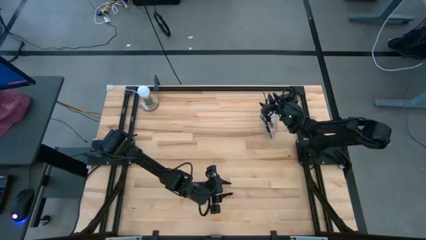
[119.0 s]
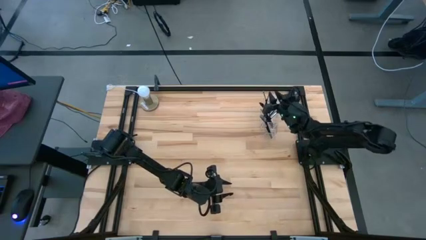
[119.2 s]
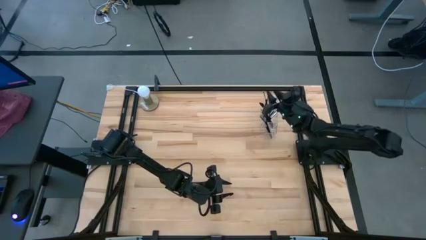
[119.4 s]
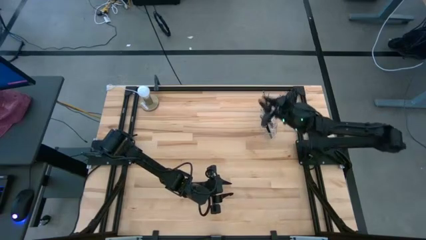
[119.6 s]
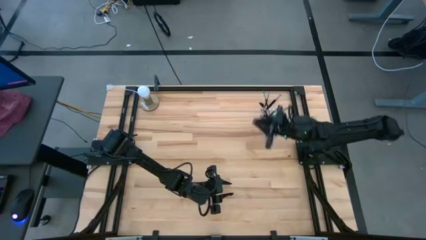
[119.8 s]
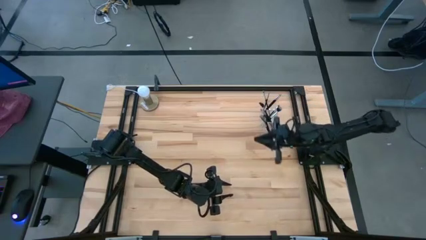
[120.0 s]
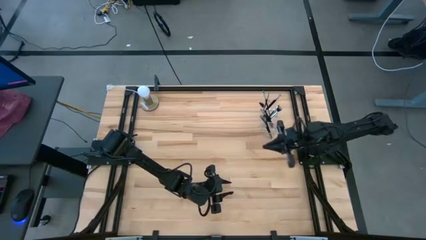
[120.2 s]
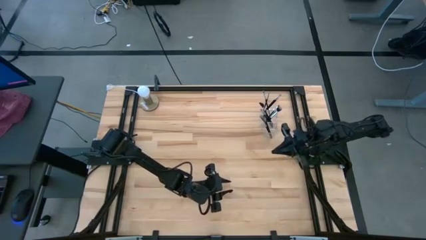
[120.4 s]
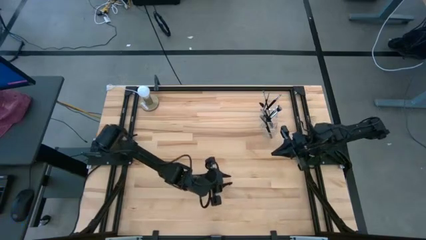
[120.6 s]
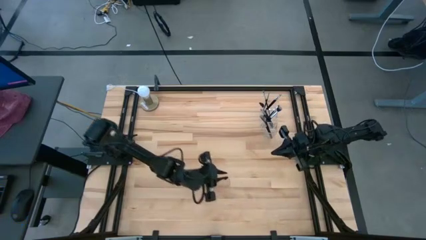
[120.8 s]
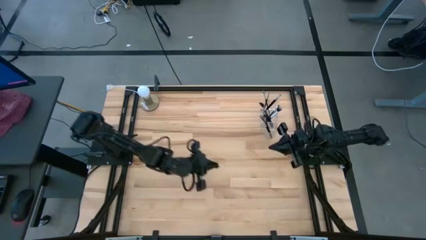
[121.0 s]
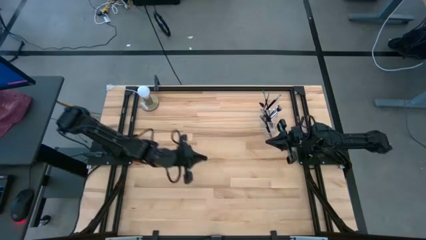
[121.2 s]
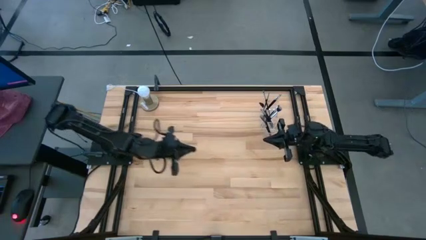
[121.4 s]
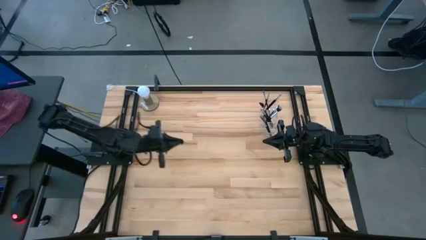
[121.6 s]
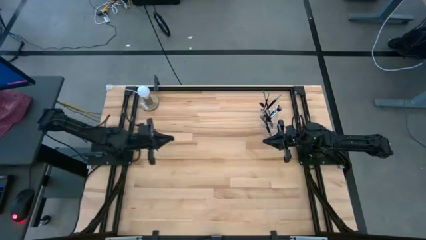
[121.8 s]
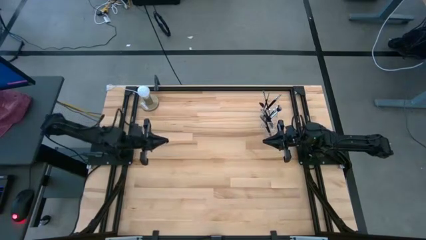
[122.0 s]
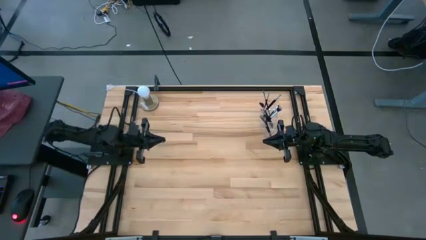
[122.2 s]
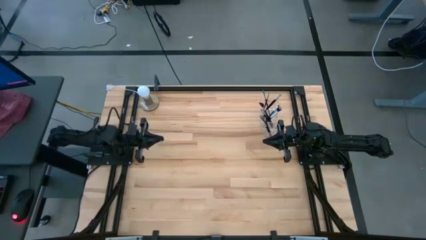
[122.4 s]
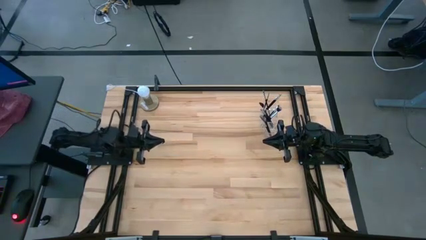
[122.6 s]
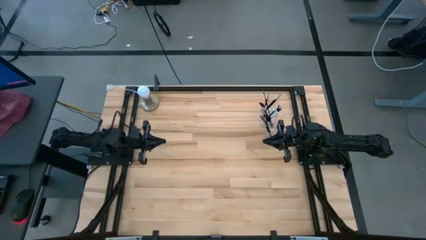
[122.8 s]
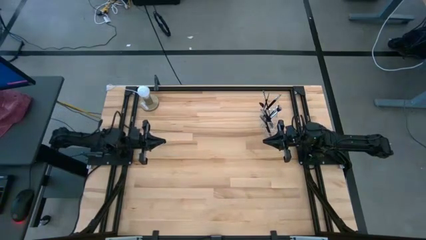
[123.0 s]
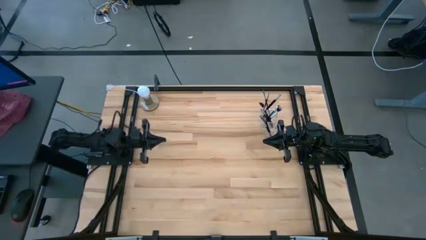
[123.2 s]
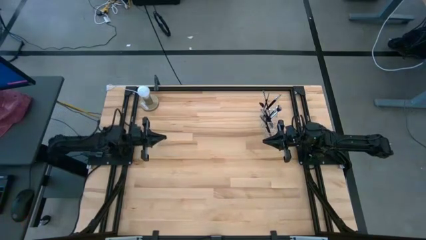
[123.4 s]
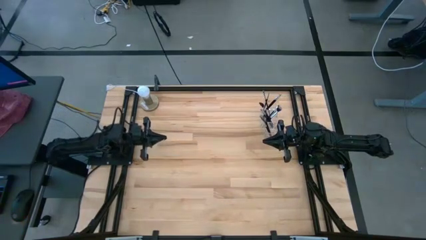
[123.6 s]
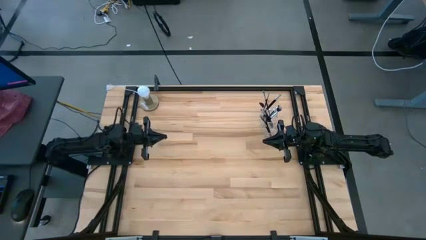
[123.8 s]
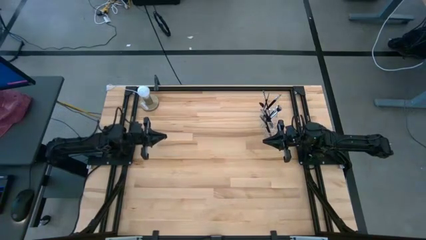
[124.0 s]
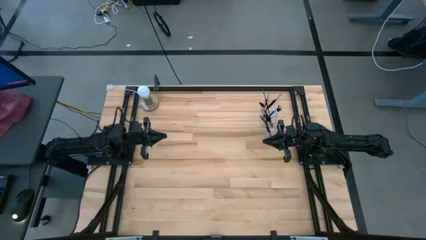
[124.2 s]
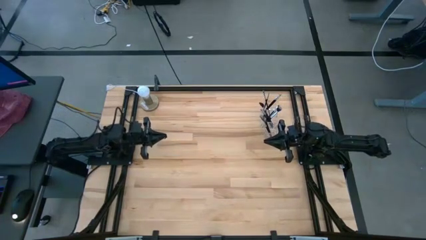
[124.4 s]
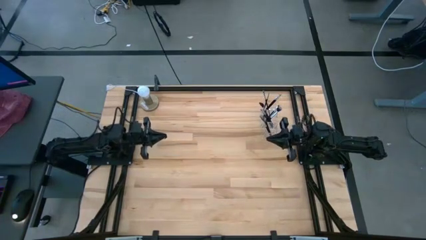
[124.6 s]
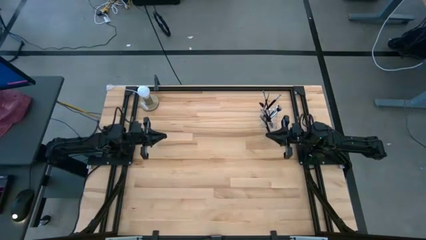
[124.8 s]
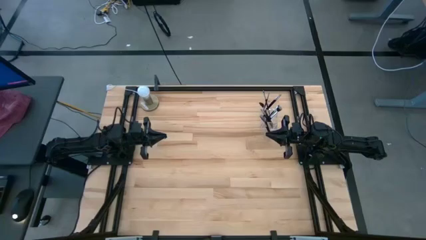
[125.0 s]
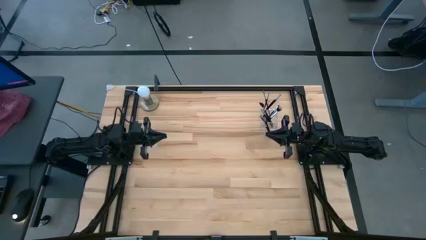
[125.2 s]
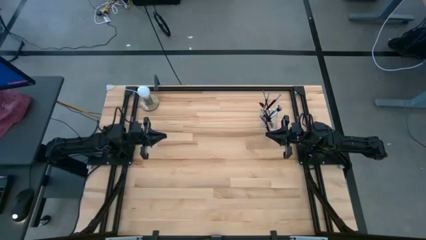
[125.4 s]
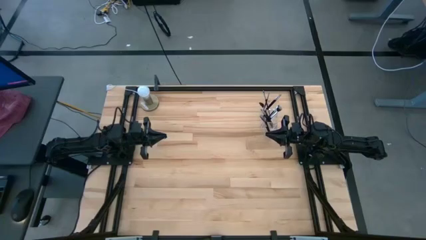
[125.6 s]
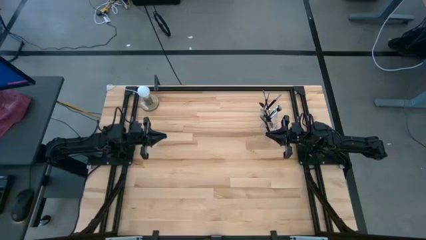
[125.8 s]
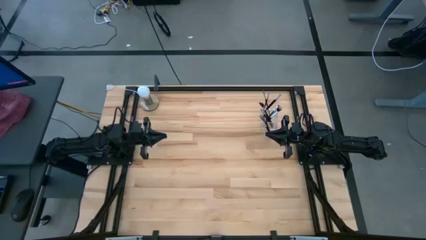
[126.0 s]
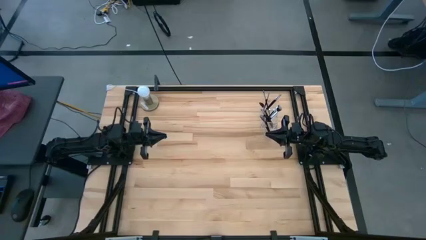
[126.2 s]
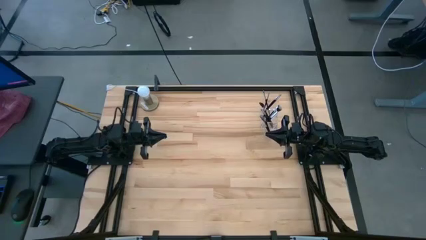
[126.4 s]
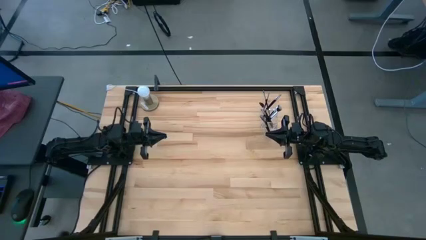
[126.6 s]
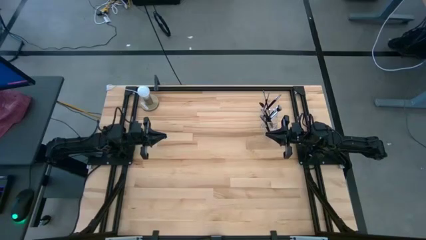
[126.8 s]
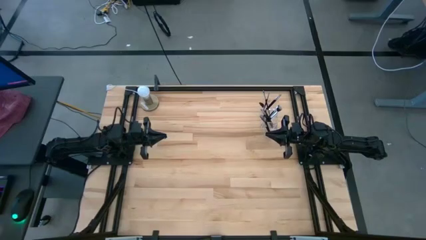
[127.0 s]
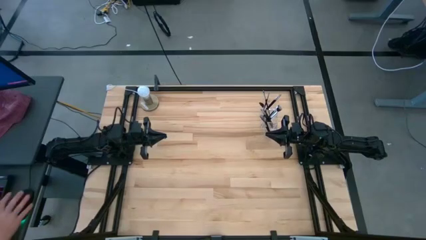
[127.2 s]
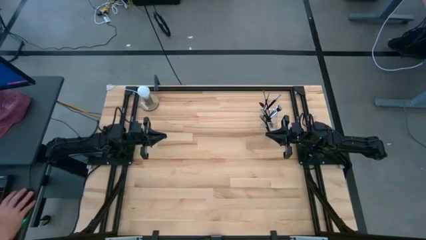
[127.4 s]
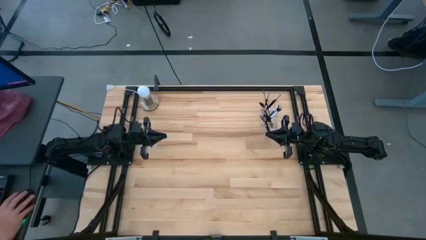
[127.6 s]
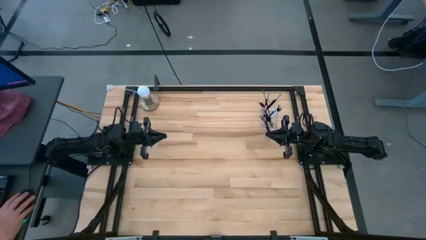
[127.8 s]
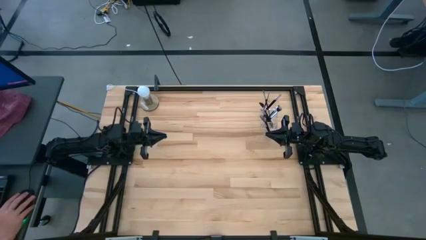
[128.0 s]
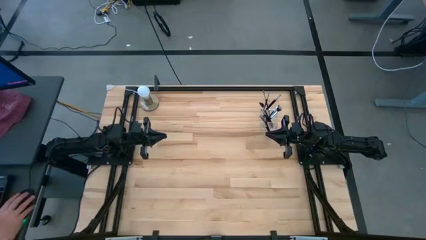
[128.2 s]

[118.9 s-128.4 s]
Task: Sort items
Return to Home Position
